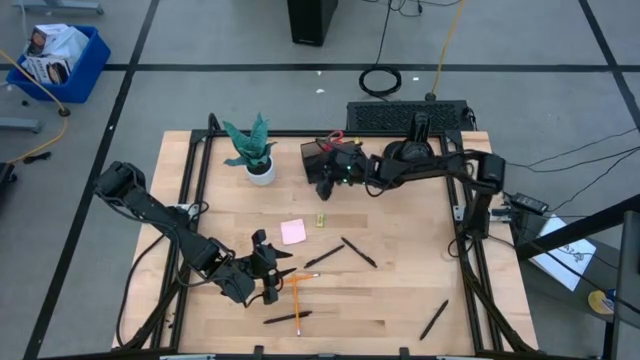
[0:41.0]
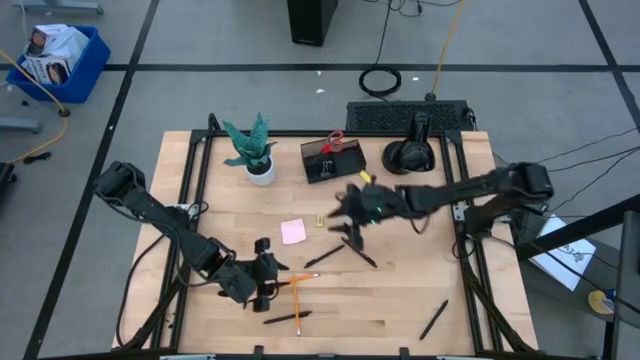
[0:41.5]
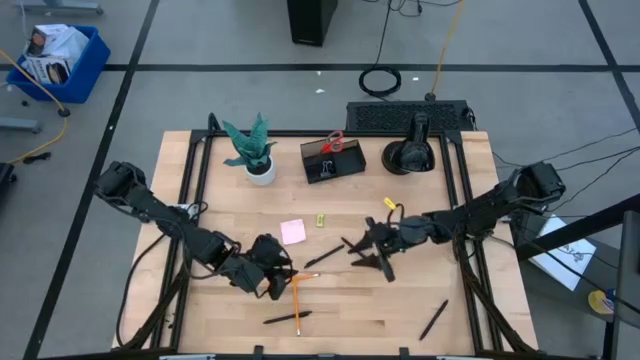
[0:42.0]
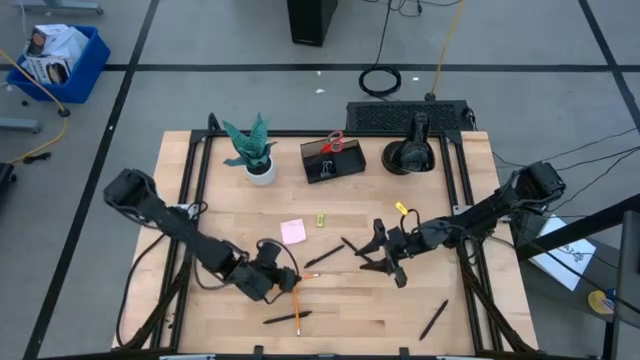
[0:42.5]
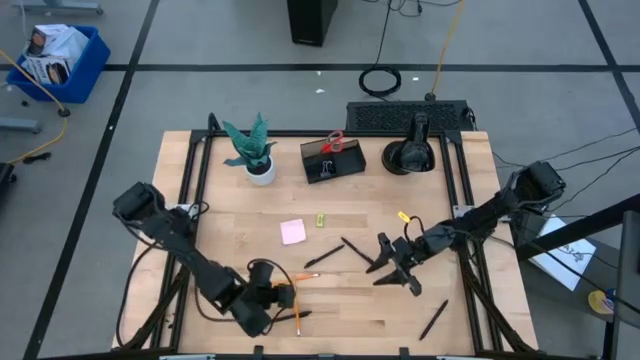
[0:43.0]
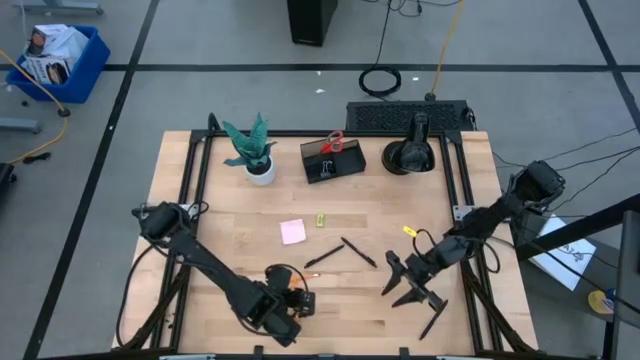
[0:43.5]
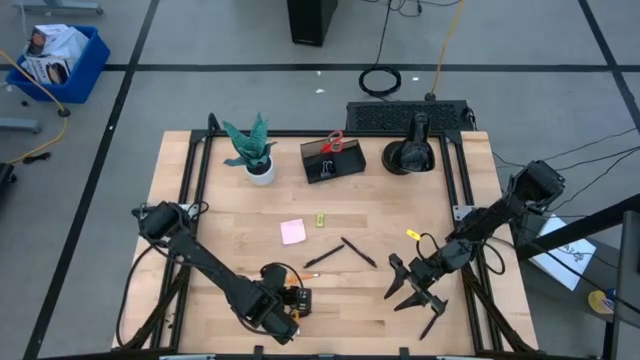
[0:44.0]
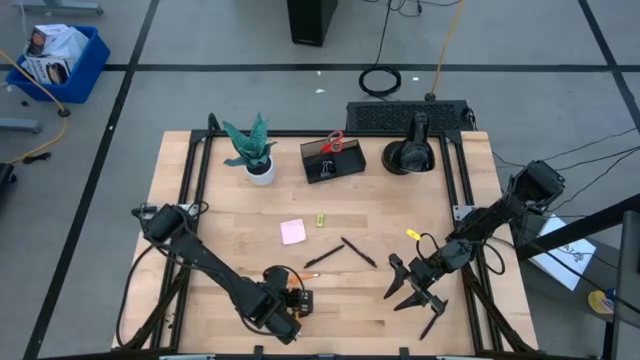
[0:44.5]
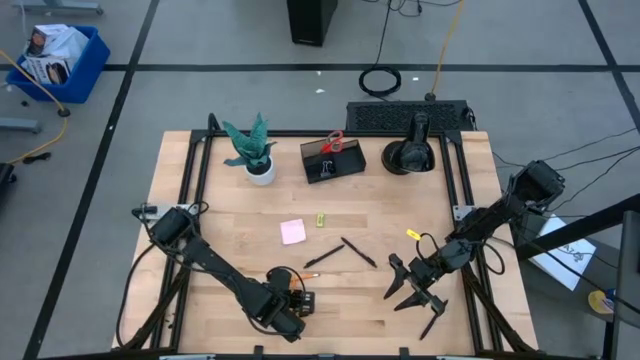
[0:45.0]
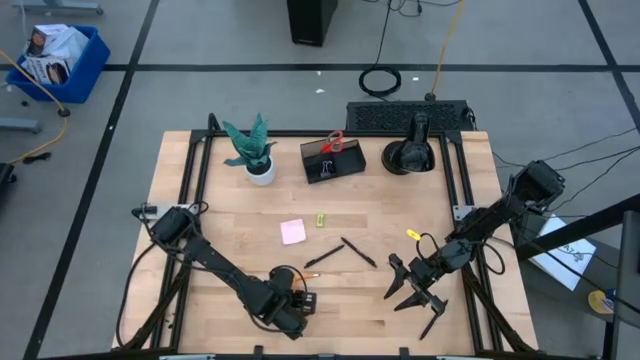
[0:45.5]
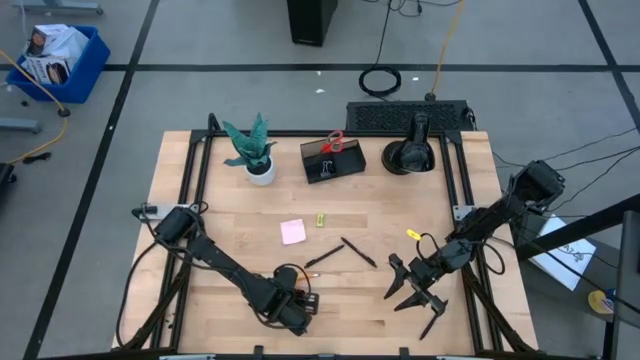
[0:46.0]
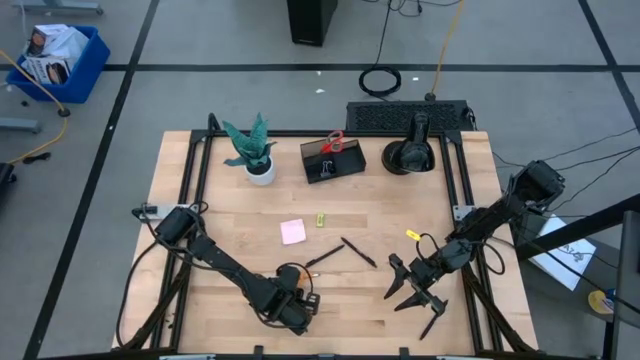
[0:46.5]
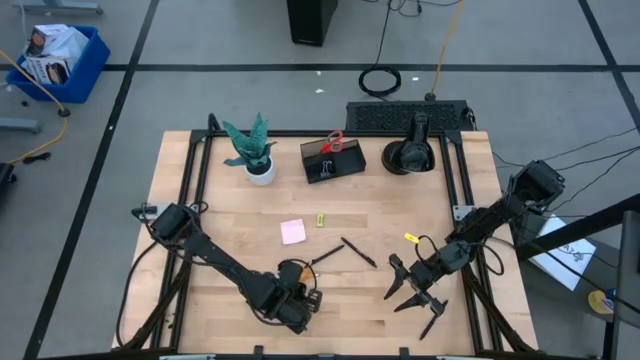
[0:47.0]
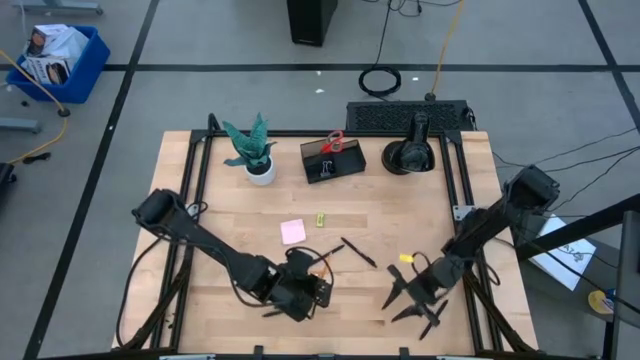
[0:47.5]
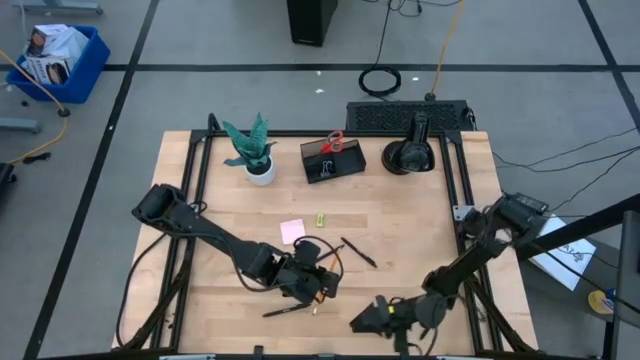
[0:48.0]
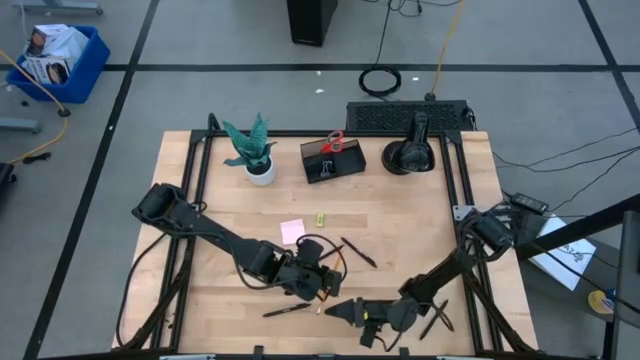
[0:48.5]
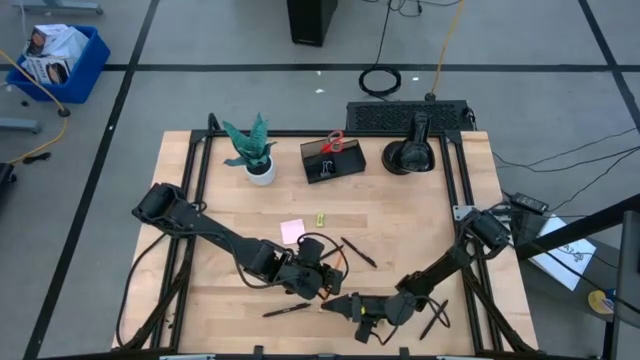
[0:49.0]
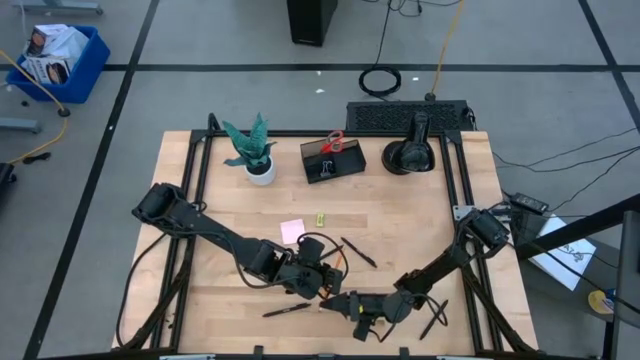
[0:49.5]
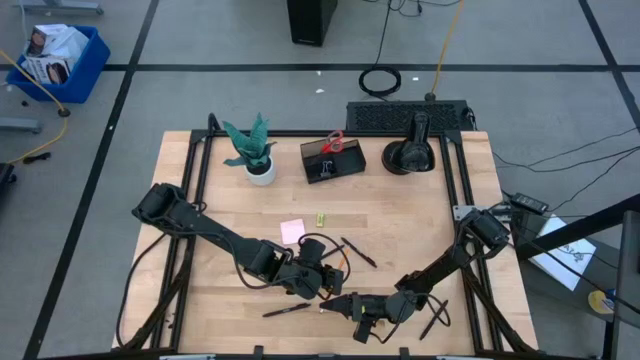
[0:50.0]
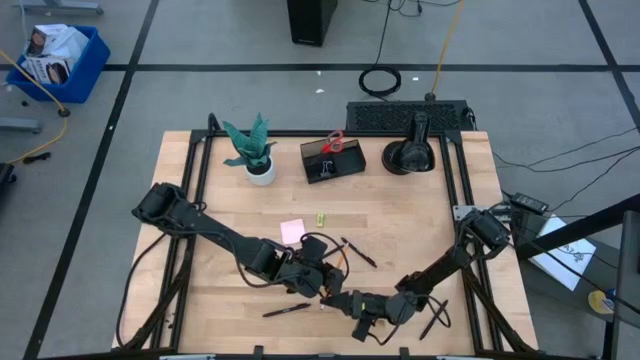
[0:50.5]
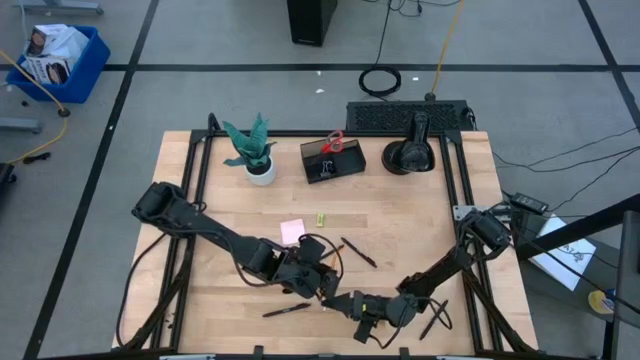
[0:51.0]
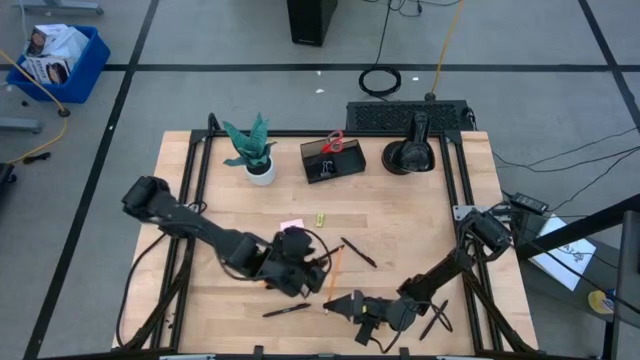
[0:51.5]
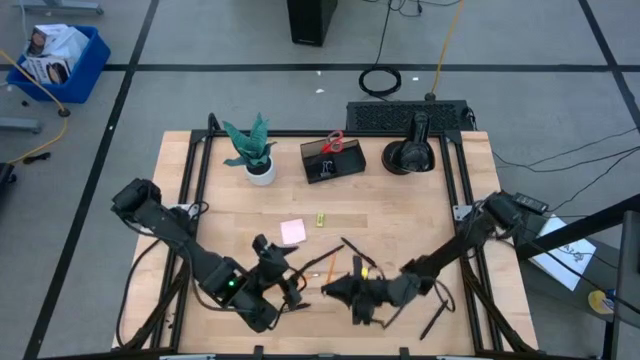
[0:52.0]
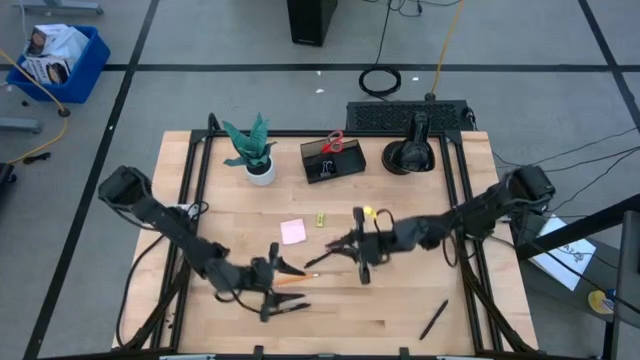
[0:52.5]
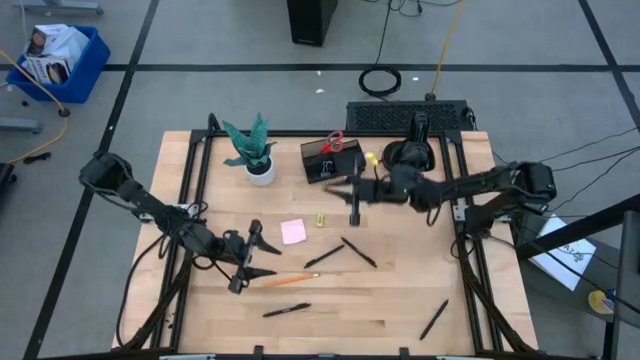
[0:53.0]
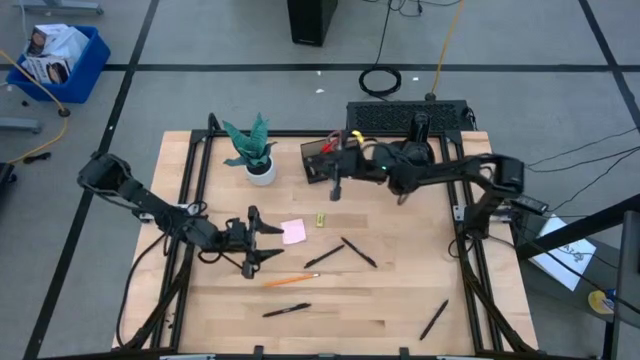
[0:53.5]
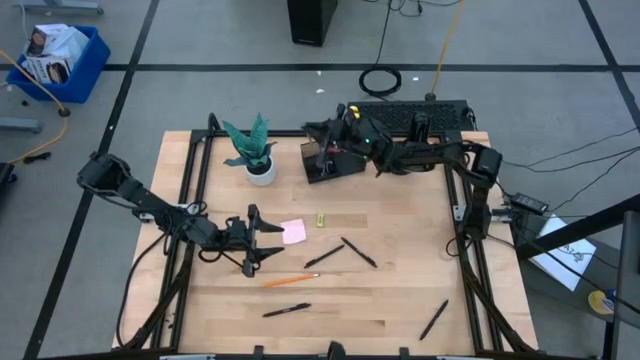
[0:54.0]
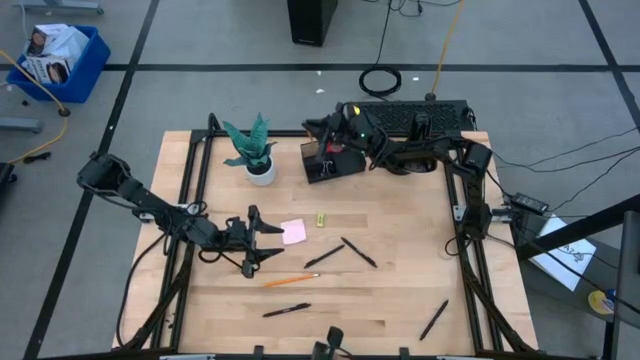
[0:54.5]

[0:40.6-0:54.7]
Task: Pick and place office supplies into organizer
Put the yellow pencil into the black mesh desk organizer

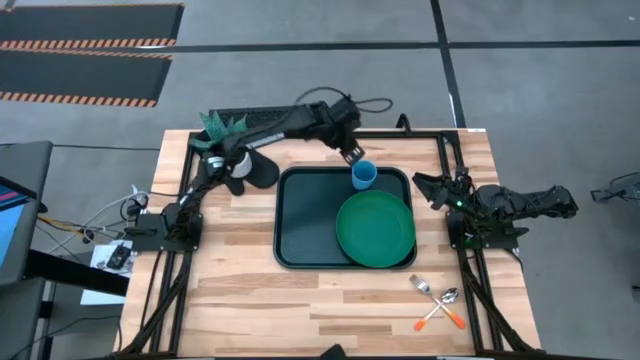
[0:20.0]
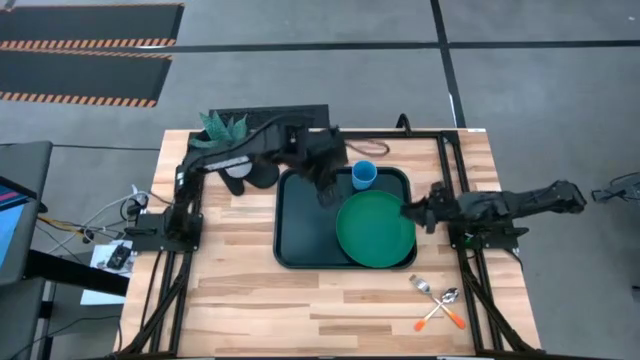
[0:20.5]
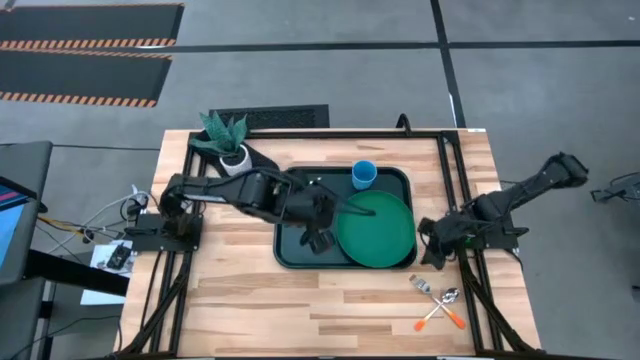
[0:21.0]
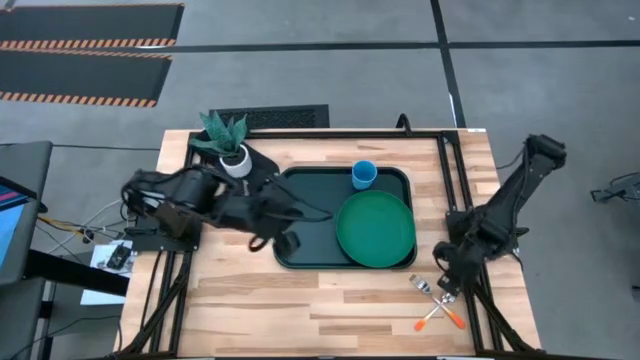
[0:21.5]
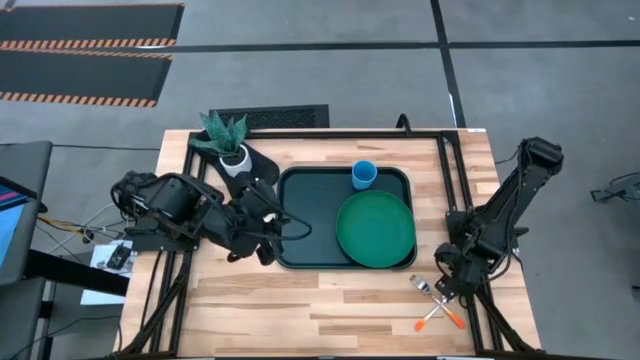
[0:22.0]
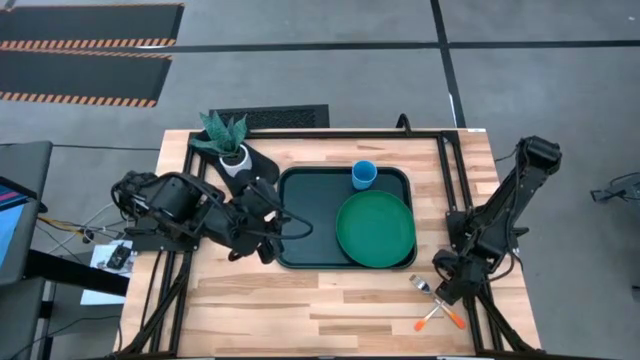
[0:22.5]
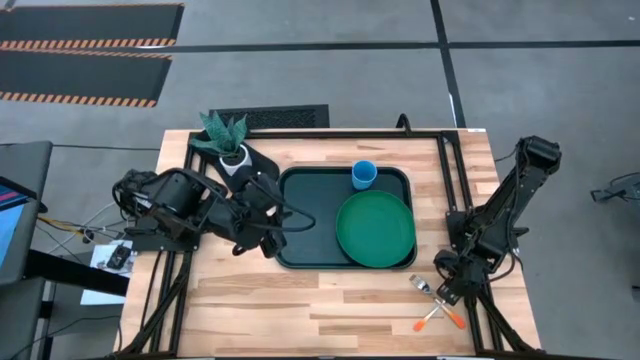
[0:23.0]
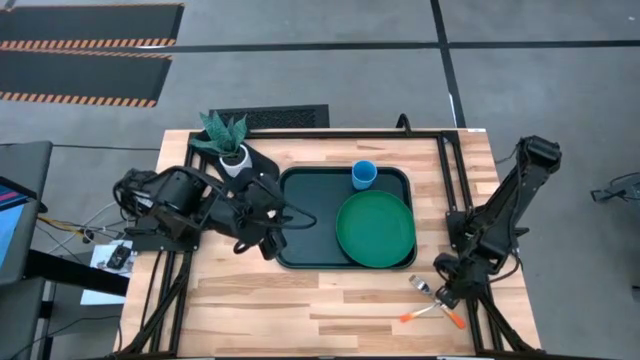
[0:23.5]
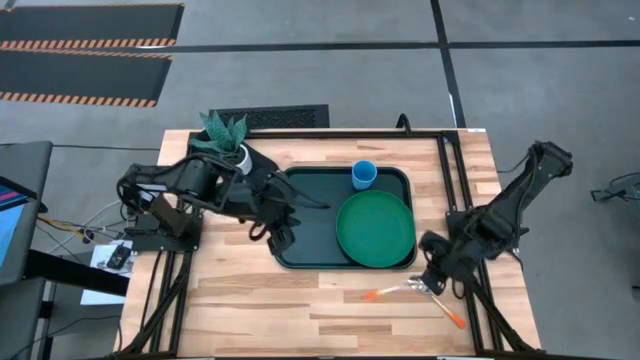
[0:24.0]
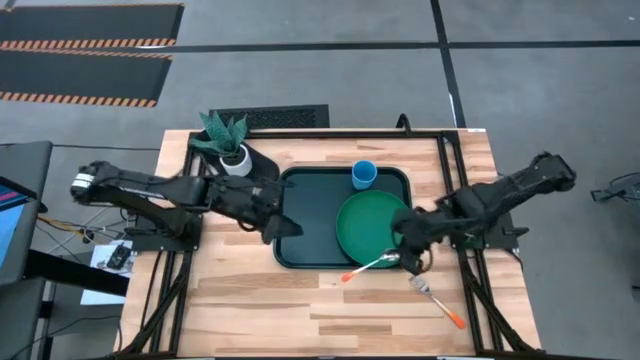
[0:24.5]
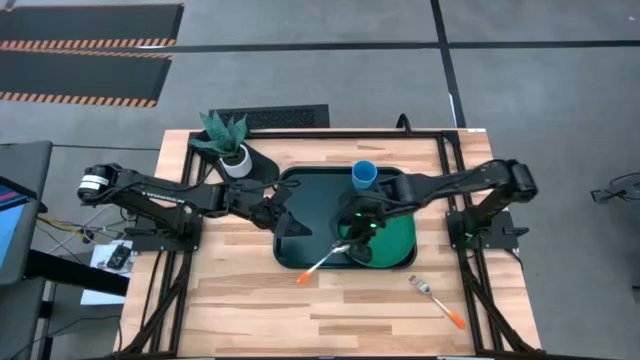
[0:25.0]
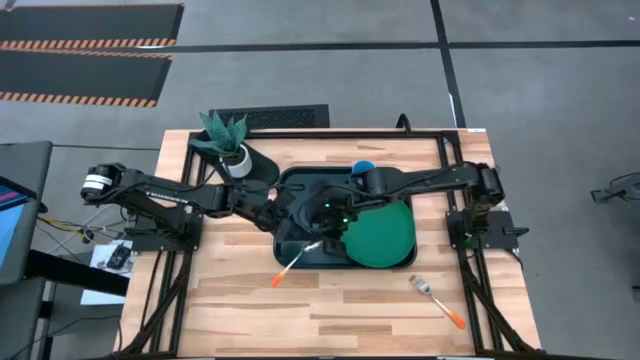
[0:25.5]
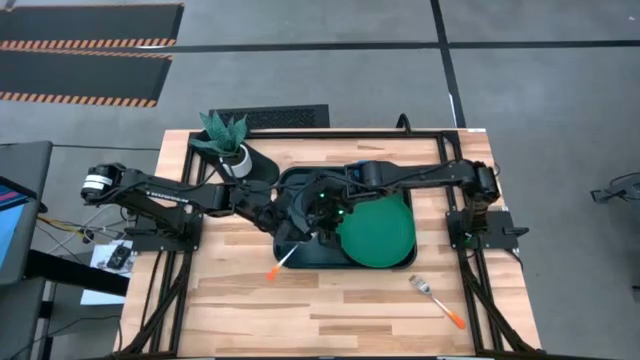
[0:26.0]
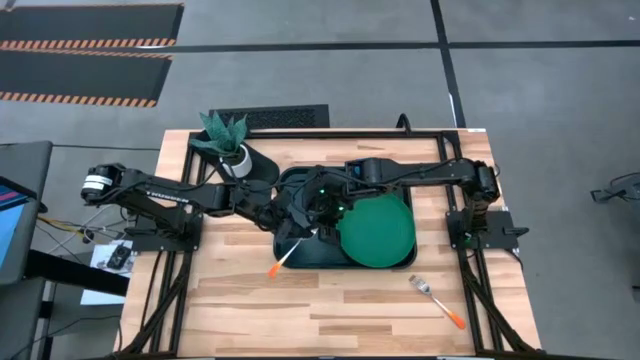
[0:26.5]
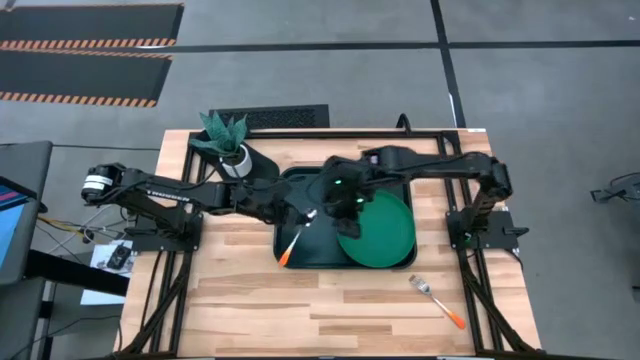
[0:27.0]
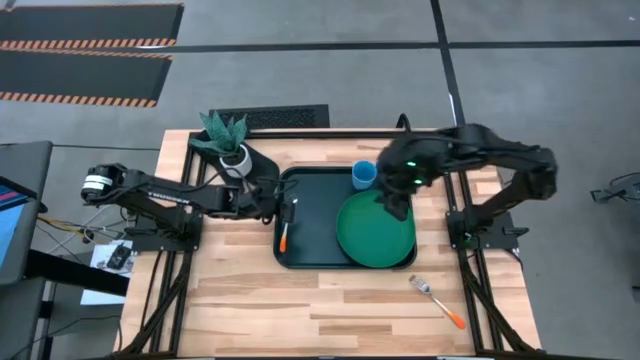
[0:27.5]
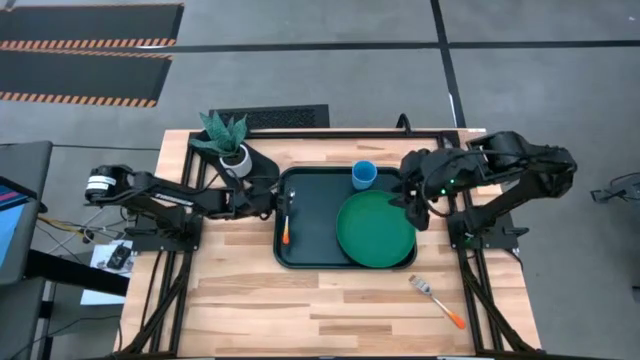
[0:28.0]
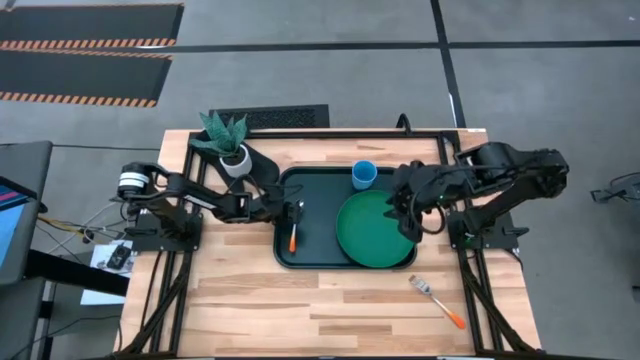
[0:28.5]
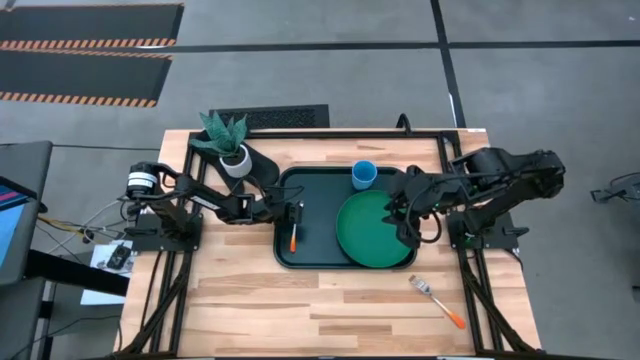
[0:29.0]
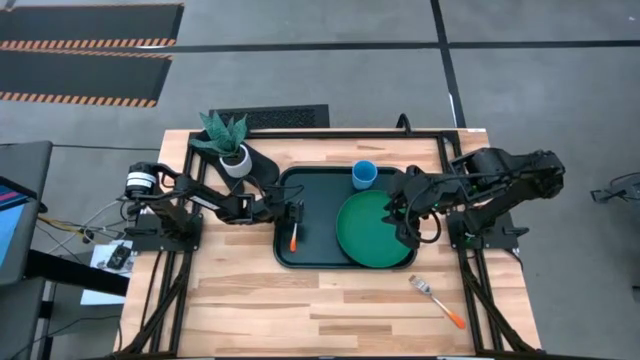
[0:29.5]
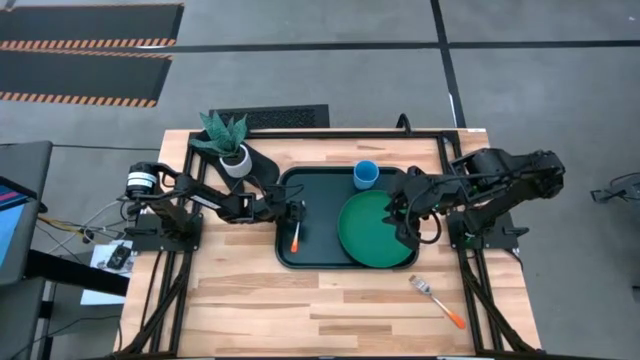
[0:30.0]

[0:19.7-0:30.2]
Task: Pick and place plate/cup/fork/spoon on tray
Put the orange spoon on the dark green serving tray to the left of the green plate
